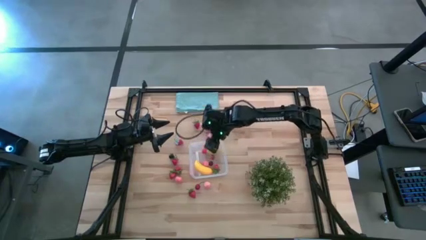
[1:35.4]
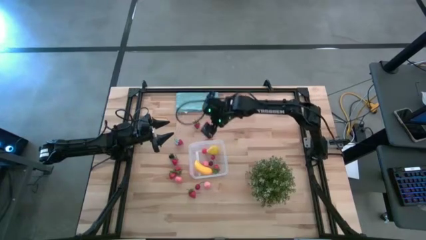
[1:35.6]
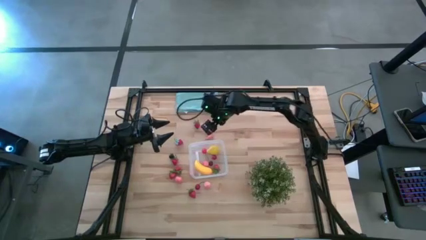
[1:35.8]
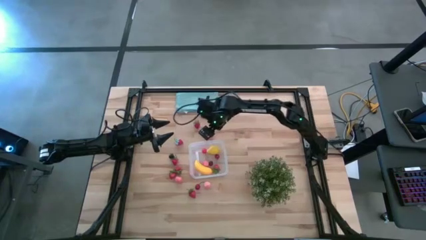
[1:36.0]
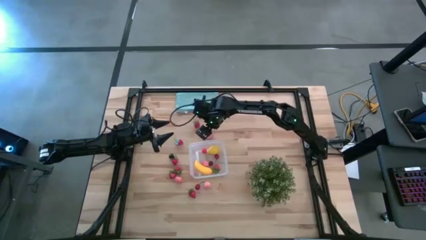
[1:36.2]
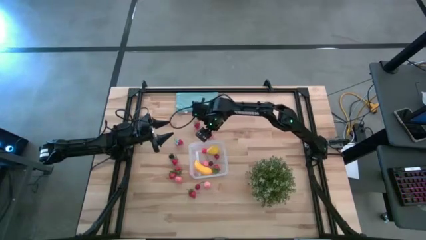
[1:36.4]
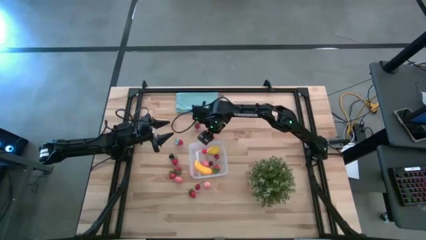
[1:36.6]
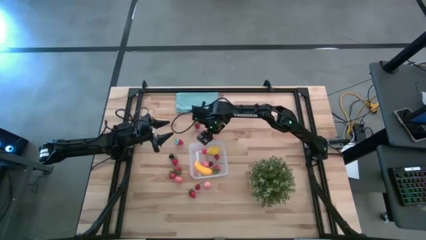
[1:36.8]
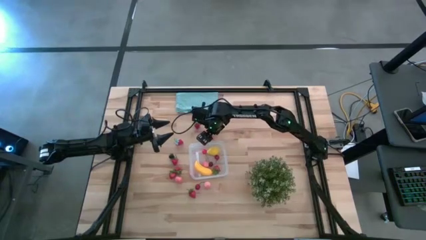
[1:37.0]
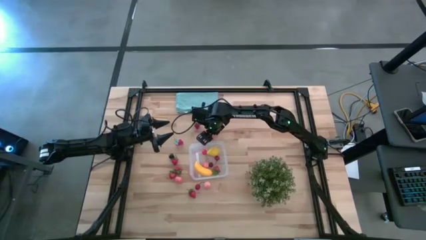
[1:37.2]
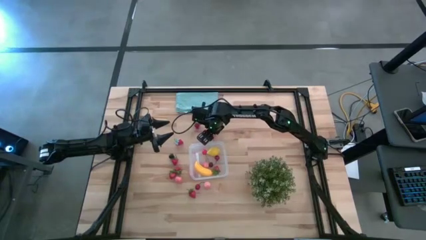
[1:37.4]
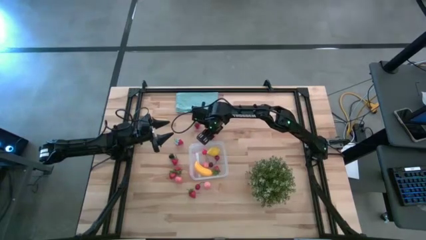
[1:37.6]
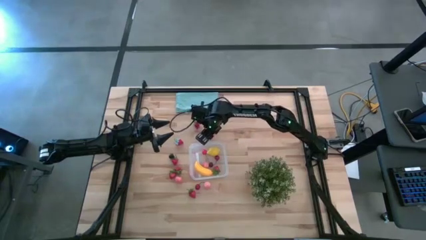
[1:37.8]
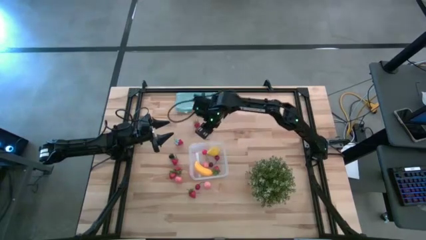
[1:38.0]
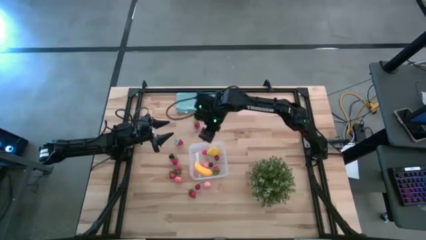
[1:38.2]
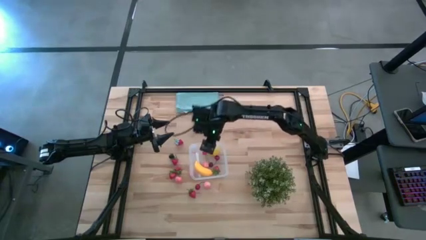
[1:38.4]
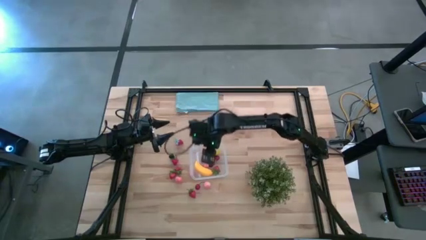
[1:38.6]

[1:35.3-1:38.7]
Task: Pick and placing Produce into tupperware
Put the pink peach into the transparent bin

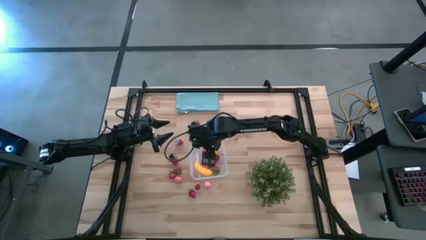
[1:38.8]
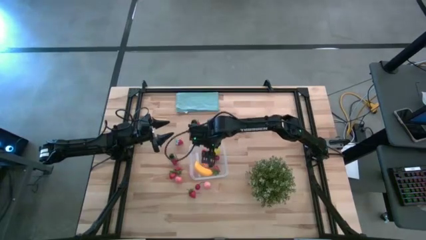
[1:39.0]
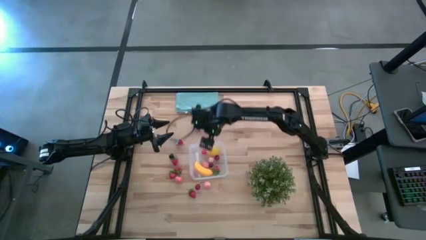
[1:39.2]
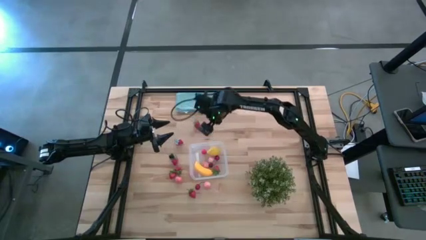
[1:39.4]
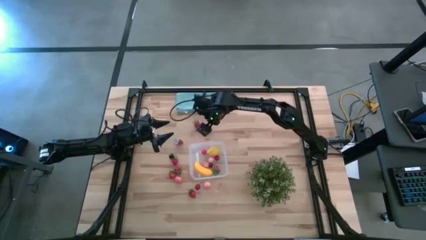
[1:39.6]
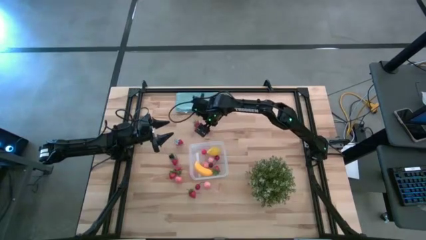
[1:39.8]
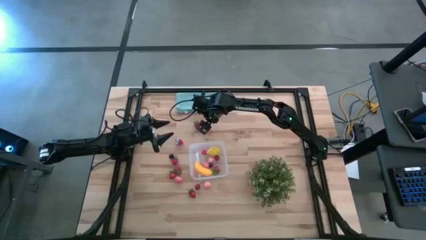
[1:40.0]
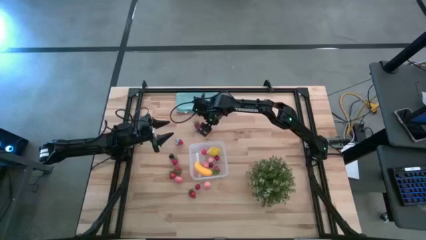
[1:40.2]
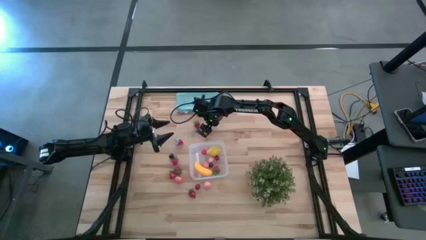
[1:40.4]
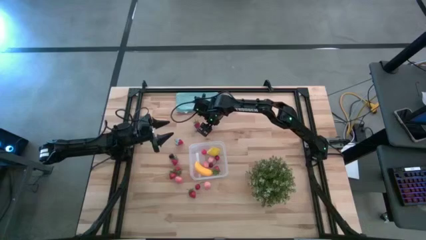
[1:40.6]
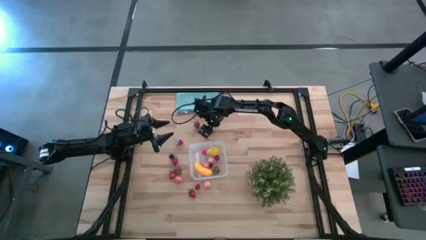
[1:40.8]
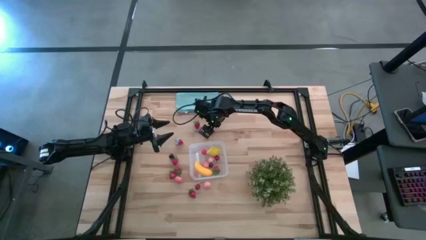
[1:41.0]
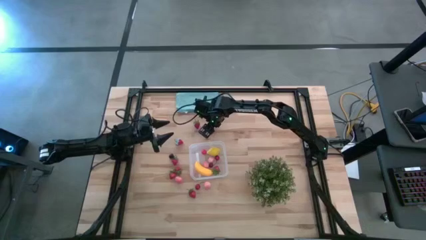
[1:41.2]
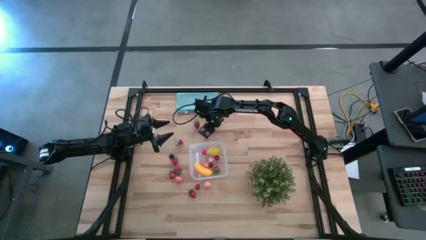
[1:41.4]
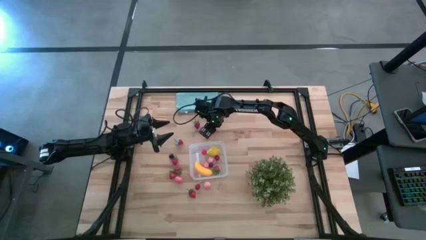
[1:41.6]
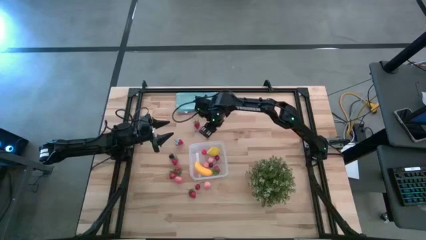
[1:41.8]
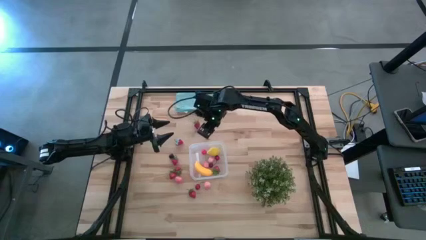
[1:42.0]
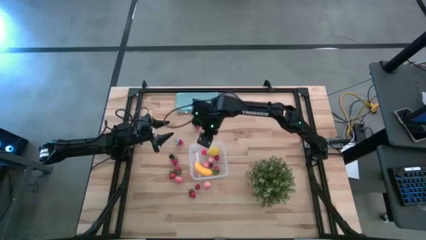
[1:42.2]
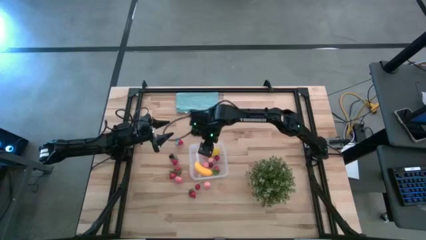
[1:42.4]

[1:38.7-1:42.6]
Put the pink peach into the transparent bin

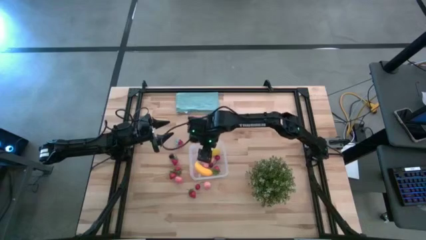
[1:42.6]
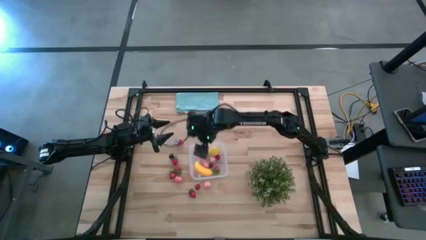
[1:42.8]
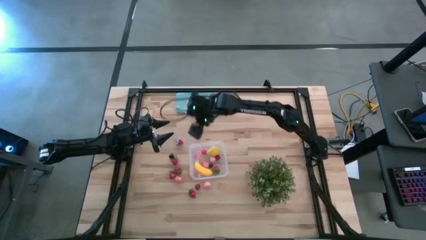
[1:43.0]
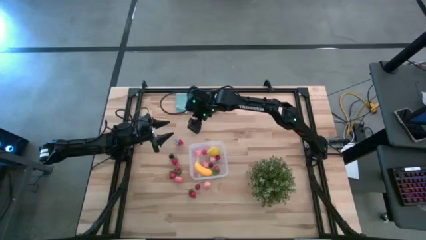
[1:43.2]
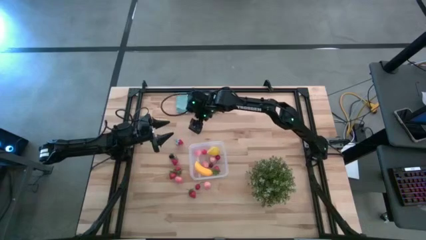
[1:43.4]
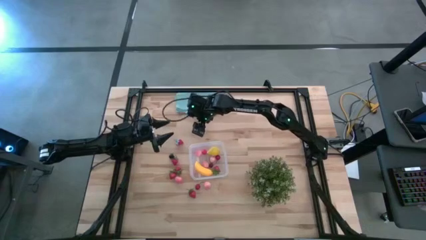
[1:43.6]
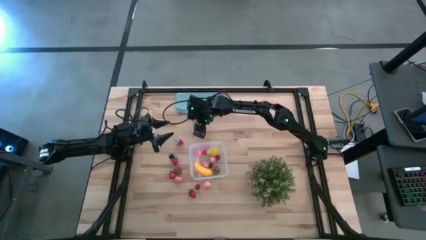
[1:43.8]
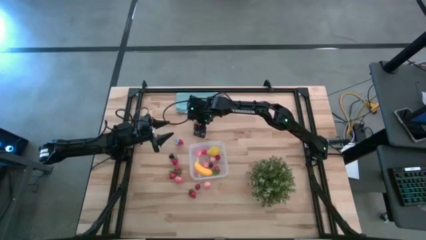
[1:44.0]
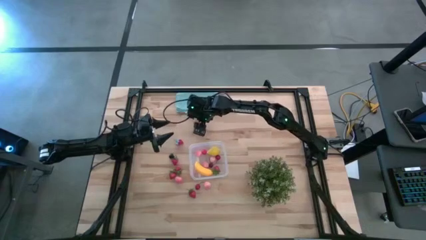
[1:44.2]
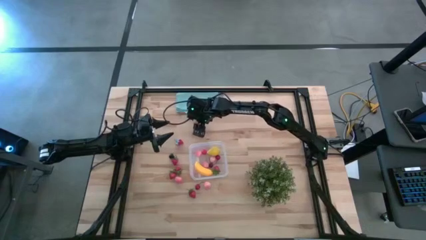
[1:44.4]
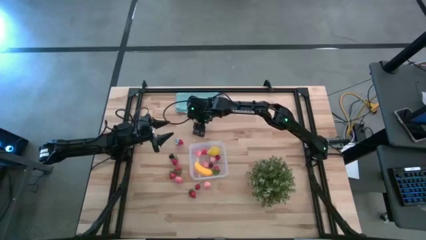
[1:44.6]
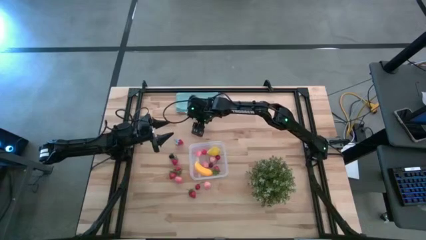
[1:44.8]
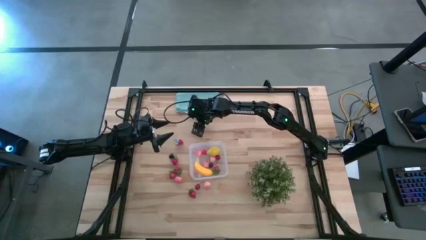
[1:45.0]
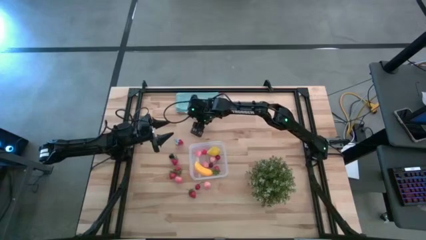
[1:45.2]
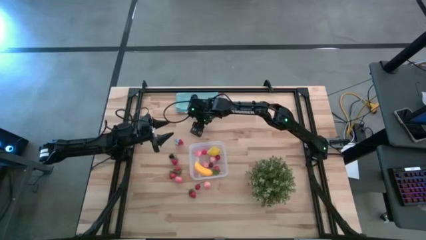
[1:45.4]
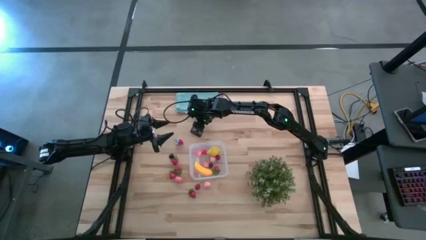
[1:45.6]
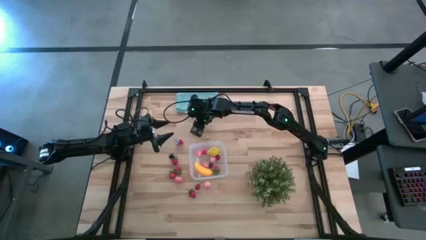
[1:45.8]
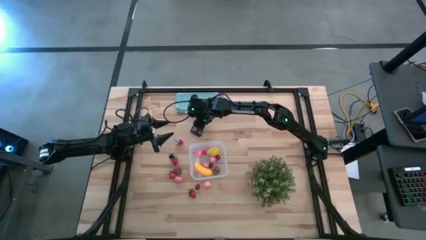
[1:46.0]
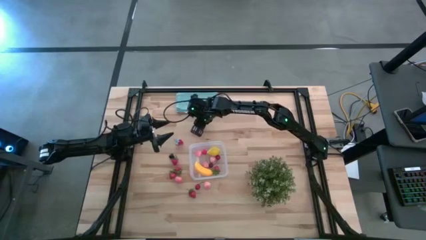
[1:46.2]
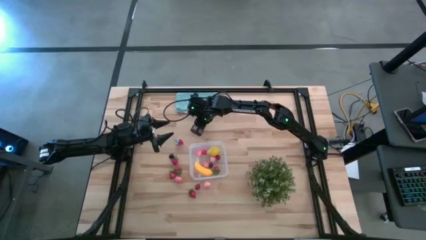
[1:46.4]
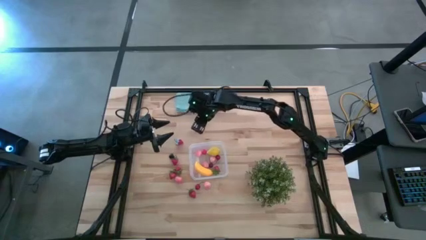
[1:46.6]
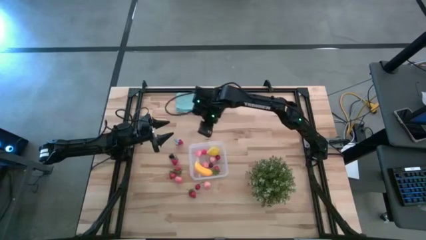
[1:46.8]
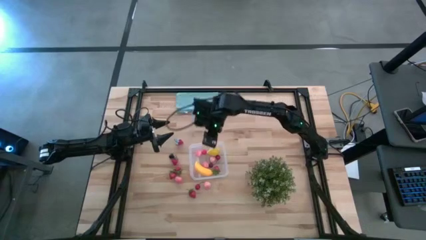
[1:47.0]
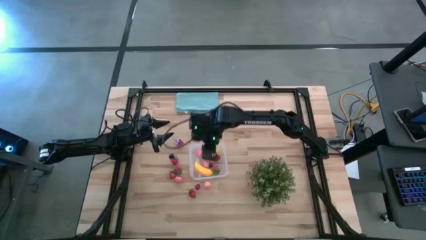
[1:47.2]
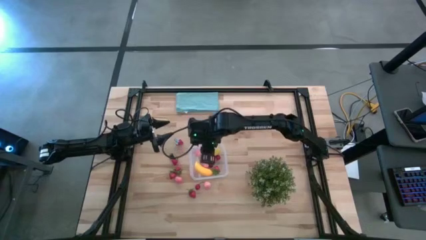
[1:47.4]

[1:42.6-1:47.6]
Put the red strawberry into the transparent bin

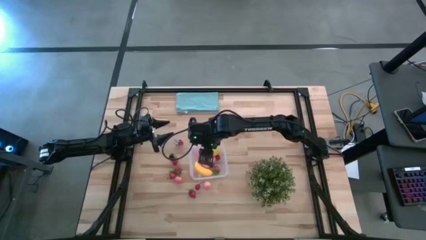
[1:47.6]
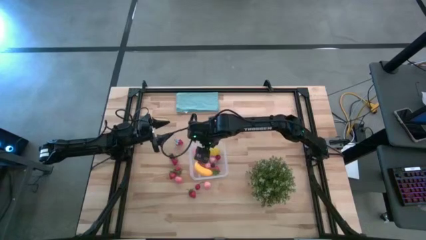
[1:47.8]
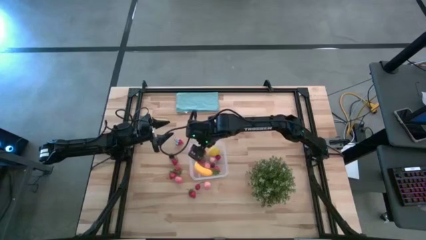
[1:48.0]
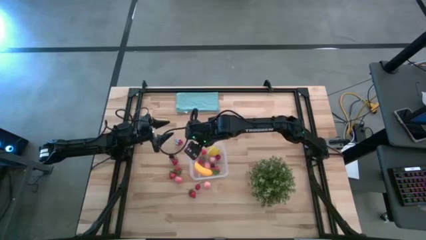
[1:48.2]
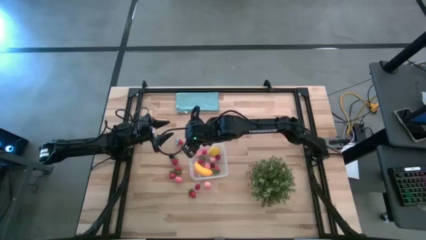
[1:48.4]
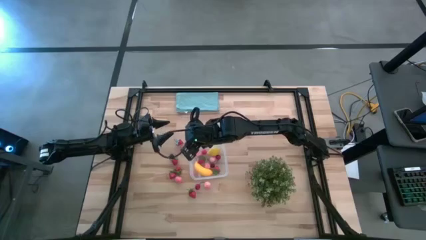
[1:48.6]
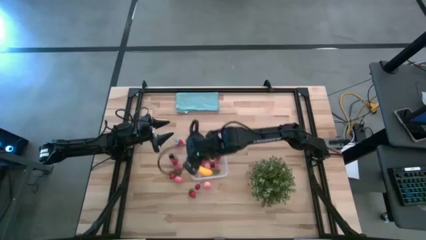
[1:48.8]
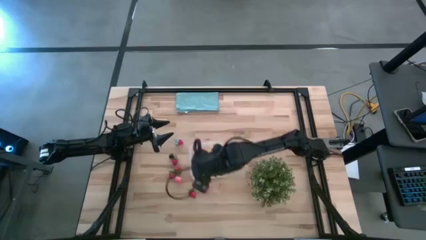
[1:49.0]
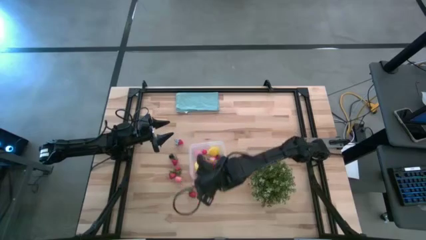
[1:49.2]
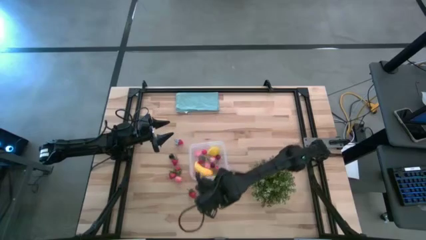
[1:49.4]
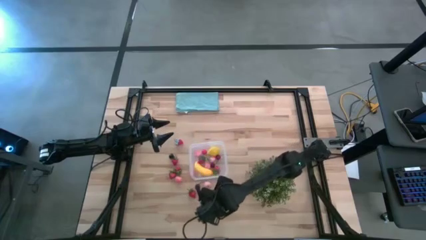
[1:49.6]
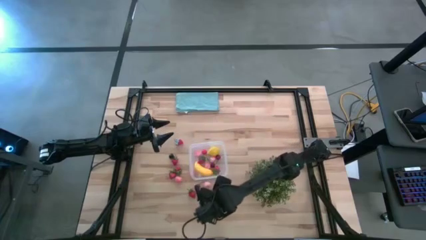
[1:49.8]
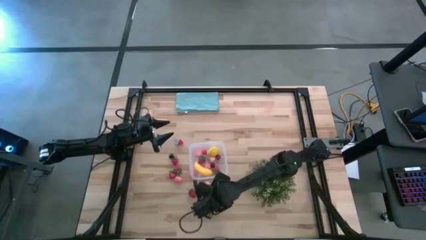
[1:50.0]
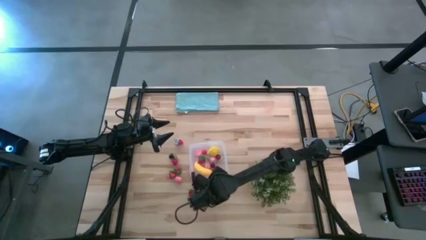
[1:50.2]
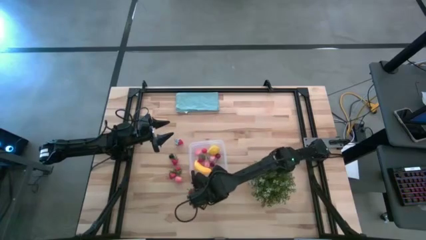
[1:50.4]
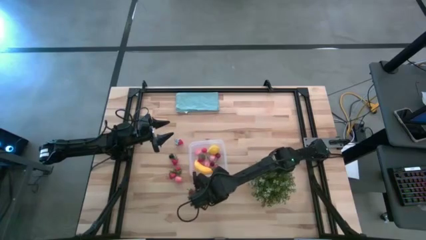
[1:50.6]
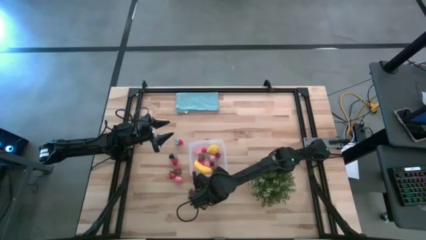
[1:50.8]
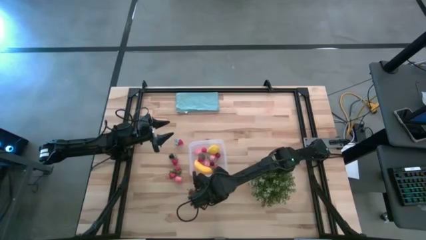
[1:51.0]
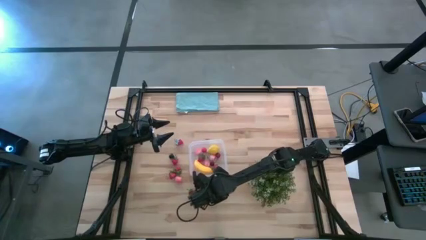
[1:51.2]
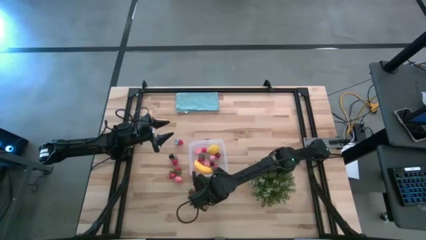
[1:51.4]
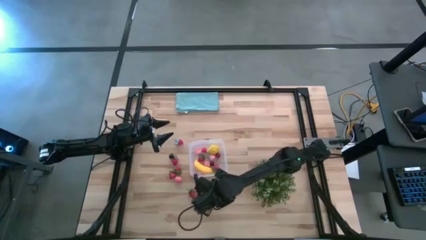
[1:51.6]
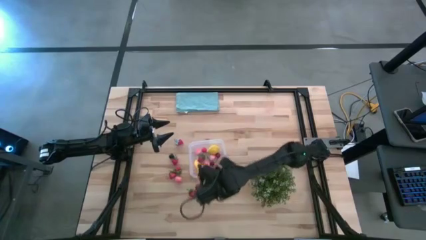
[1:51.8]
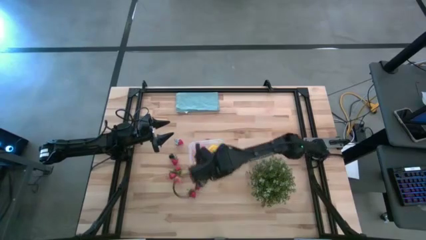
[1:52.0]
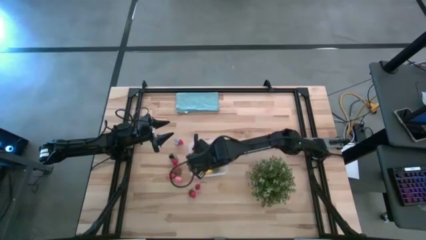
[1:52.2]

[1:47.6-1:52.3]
Put the pink peach into the transparent bin
